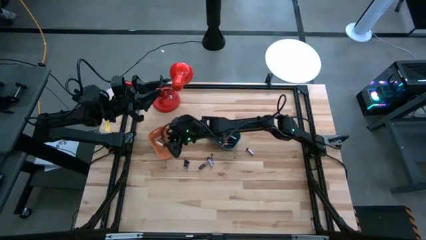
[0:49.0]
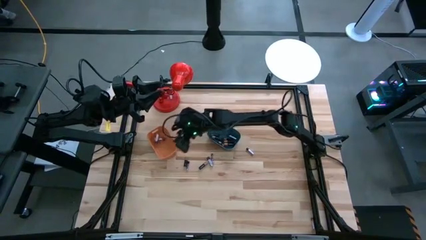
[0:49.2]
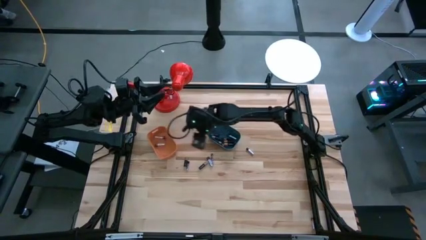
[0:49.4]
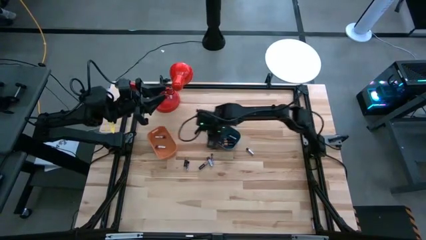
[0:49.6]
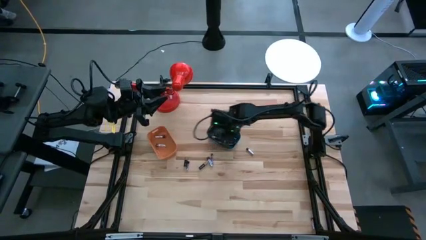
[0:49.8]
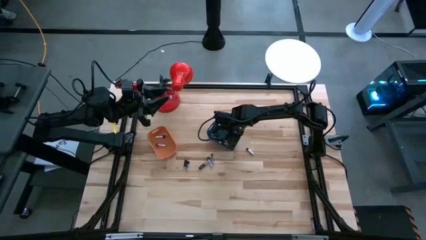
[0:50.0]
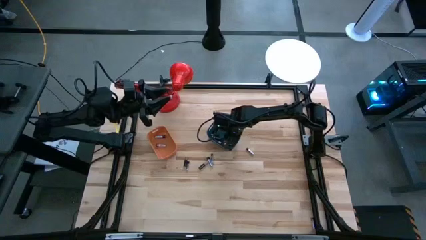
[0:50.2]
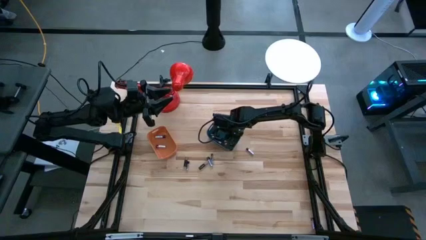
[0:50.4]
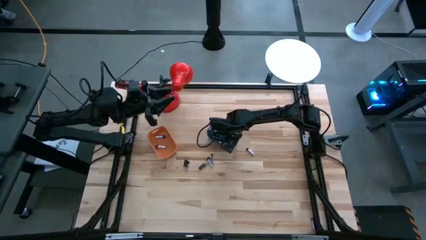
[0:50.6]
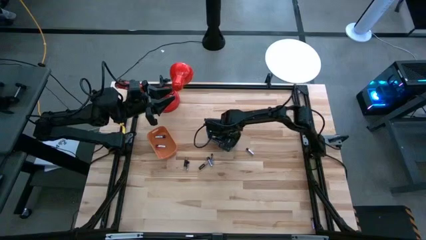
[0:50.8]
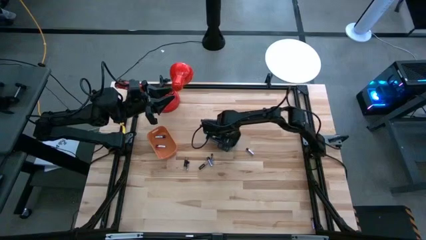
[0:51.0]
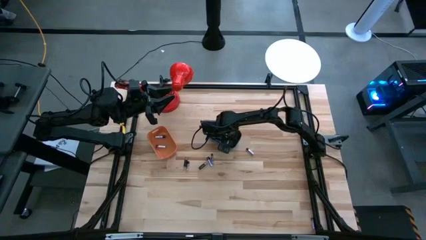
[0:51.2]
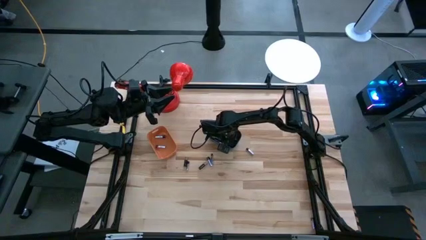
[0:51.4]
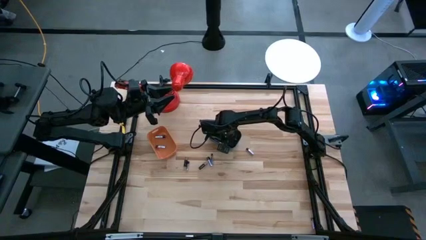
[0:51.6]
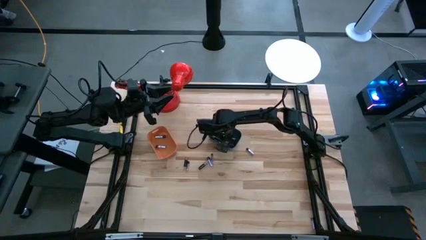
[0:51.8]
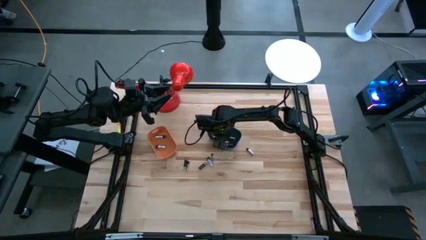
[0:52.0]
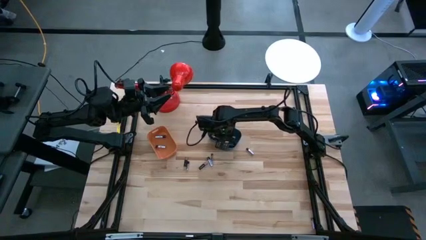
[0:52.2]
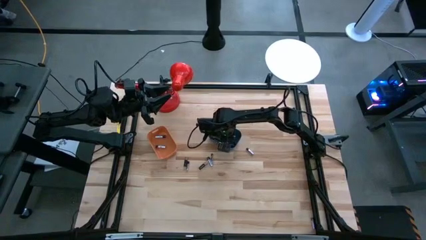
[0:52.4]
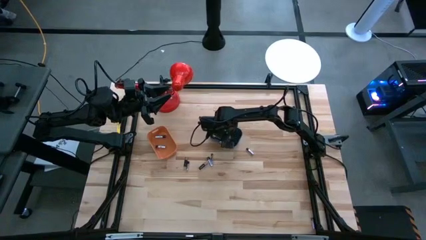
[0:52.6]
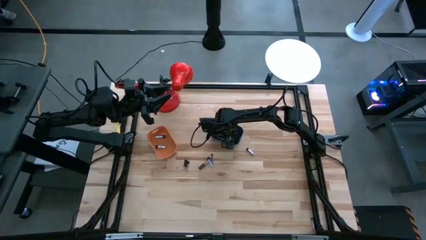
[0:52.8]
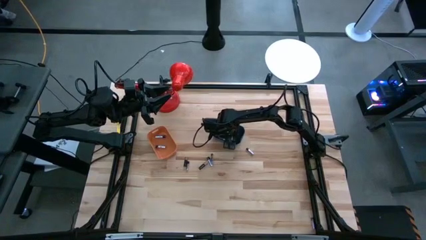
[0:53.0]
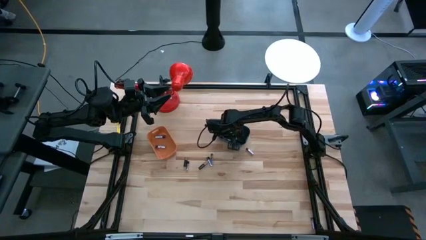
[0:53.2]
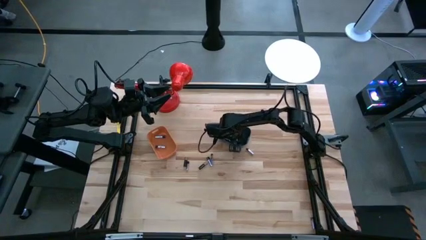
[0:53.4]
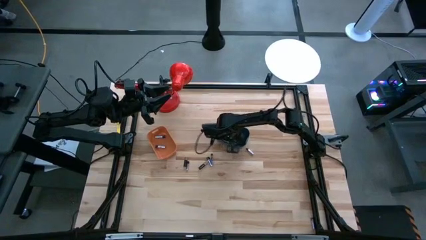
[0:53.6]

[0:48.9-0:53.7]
Task: Sort batteries
Put the silver battery from the blue bin into the orange bin

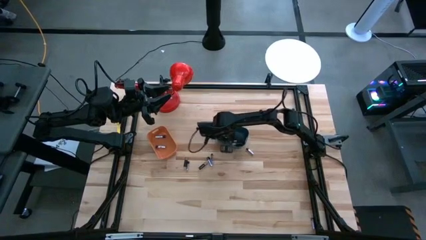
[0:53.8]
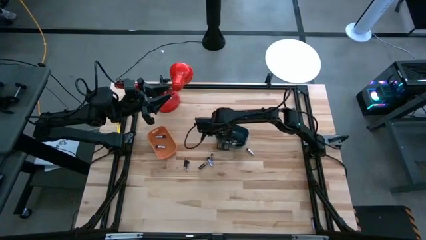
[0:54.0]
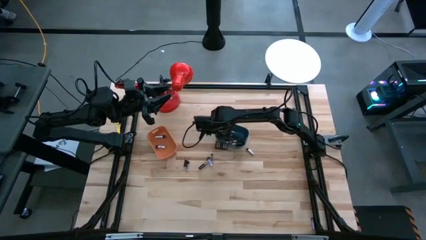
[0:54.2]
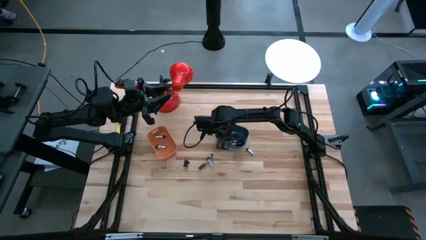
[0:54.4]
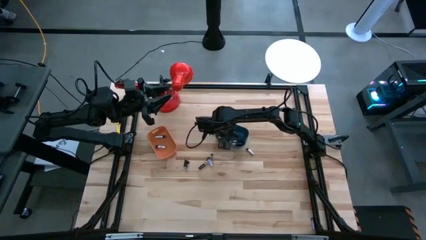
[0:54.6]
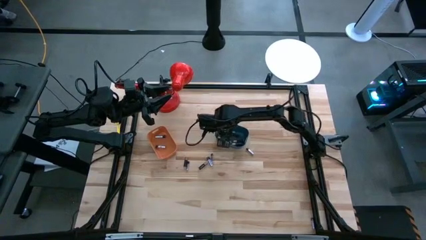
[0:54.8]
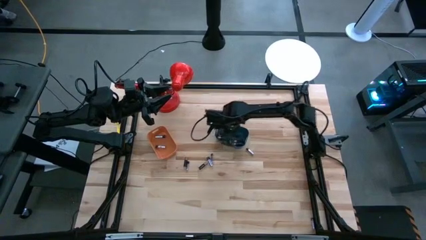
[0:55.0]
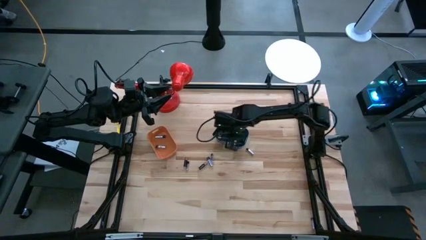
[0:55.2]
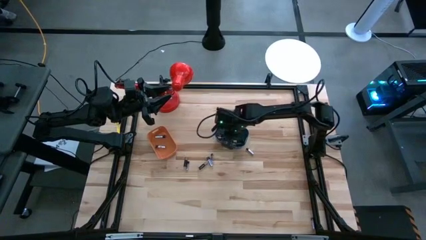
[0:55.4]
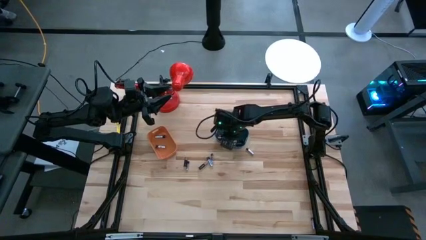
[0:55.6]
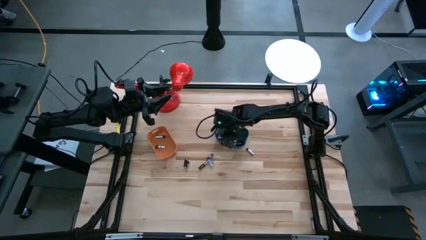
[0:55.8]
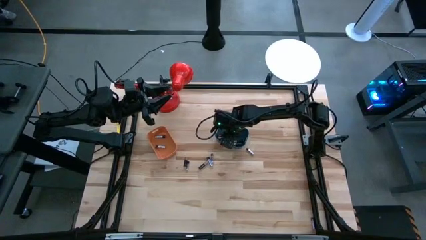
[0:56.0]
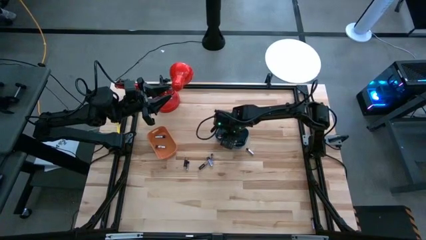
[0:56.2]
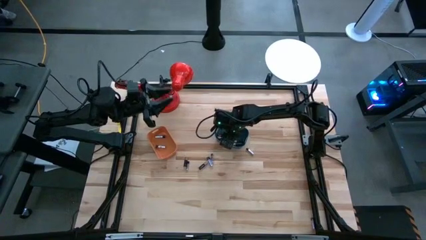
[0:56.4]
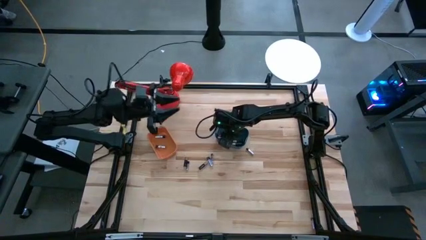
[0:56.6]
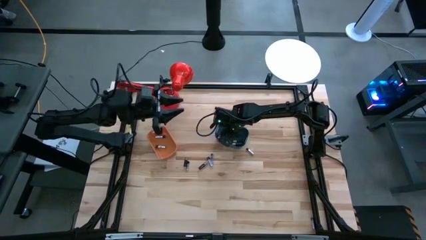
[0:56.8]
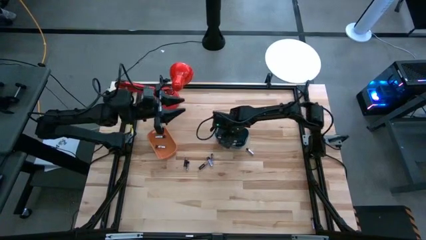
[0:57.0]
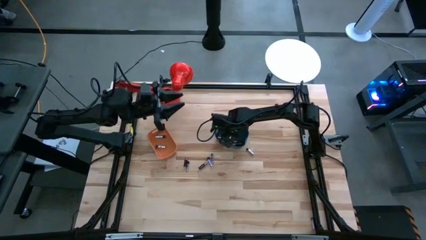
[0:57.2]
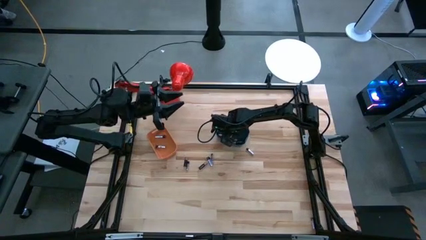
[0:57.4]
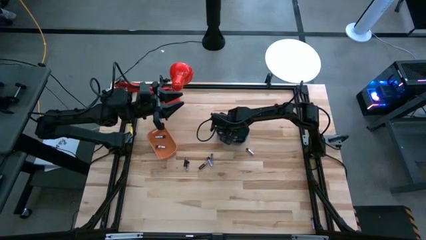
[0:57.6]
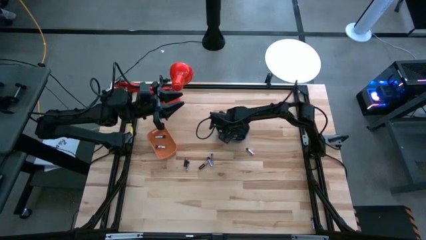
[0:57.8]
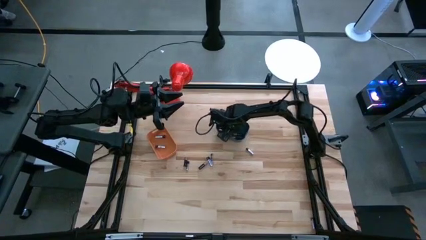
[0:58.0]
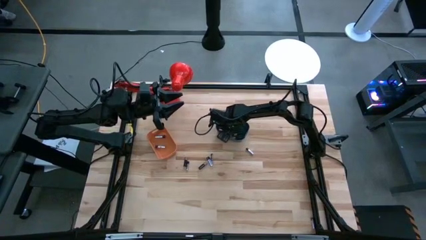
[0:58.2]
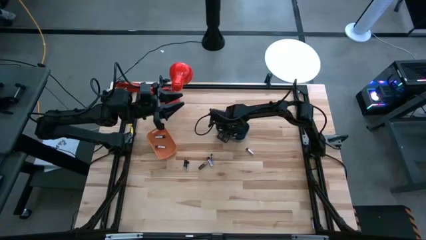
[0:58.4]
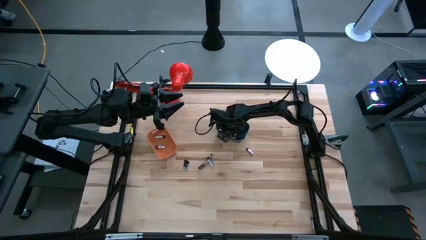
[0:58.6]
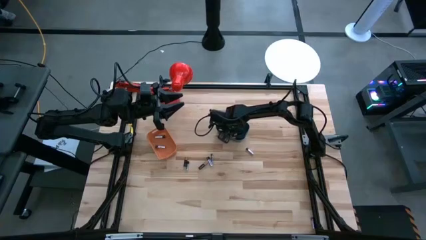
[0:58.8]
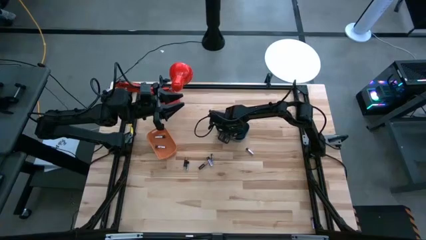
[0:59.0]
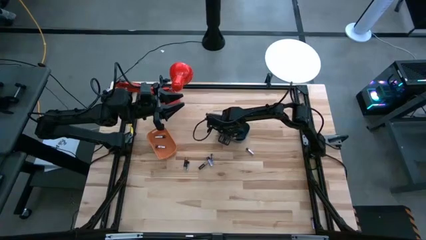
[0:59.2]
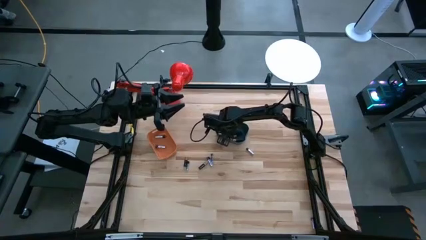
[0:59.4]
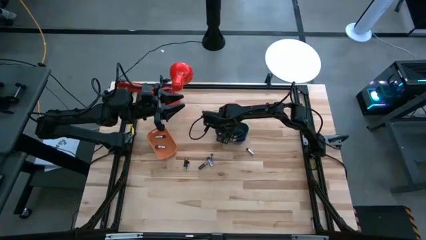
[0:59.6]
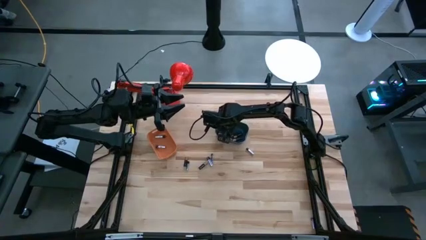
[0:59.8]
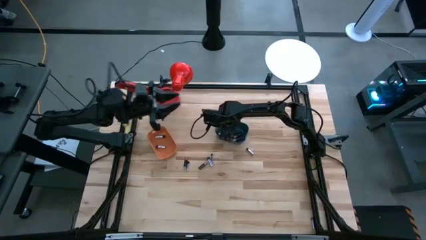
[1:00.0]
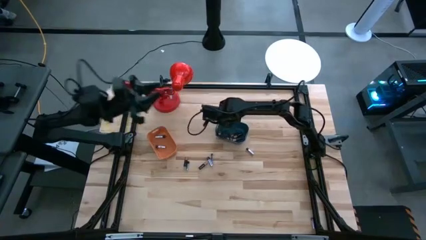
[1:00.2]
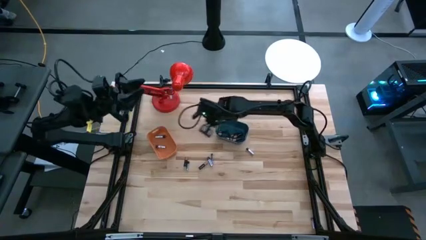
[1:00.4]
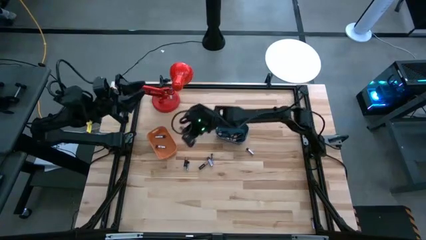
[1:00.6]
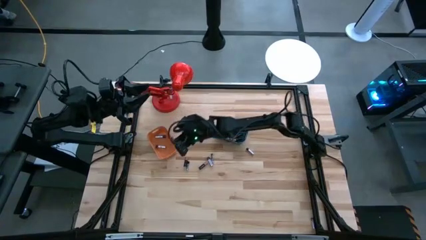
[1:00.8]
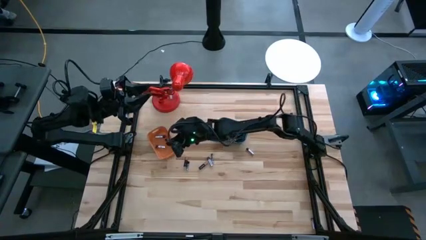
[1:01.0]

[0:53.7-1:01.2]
Put the silver battery from the blue bin into the orange bin

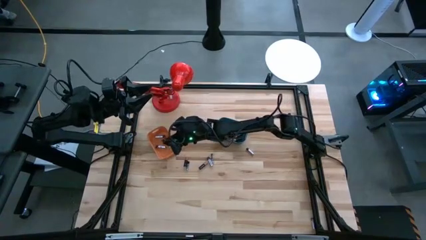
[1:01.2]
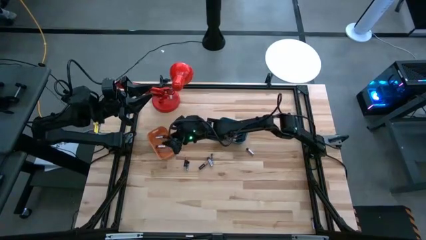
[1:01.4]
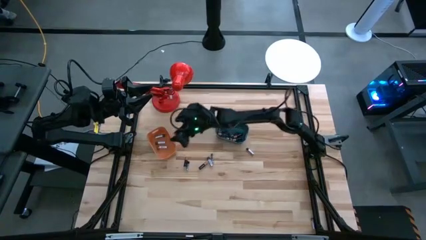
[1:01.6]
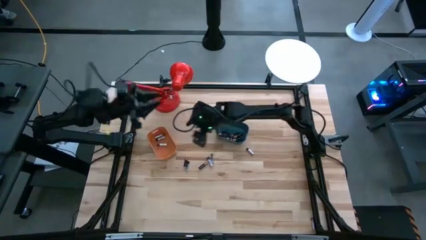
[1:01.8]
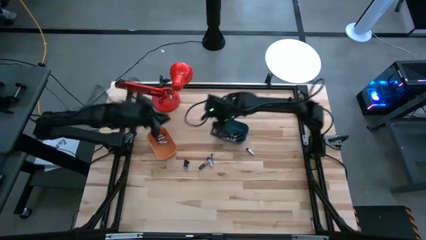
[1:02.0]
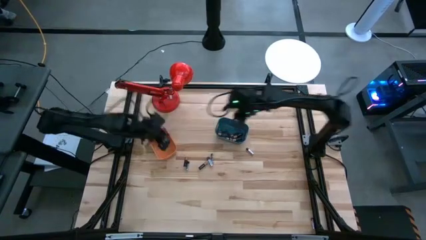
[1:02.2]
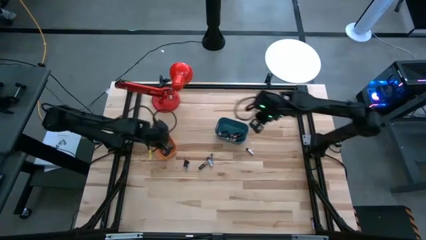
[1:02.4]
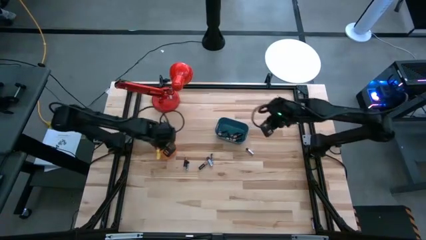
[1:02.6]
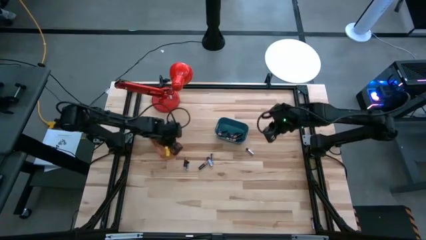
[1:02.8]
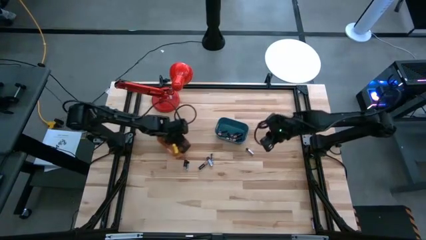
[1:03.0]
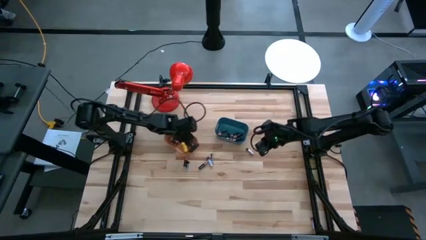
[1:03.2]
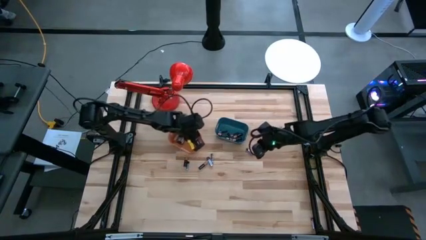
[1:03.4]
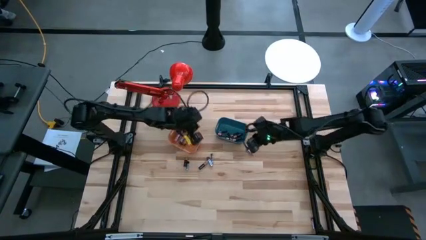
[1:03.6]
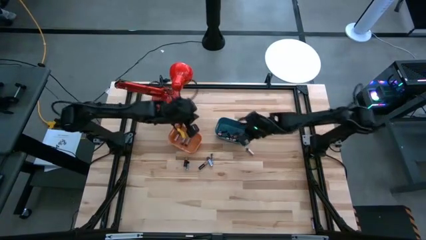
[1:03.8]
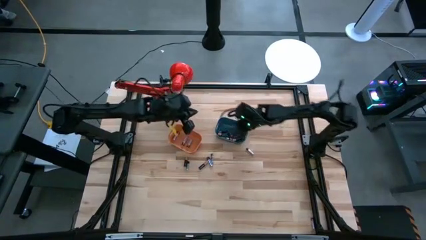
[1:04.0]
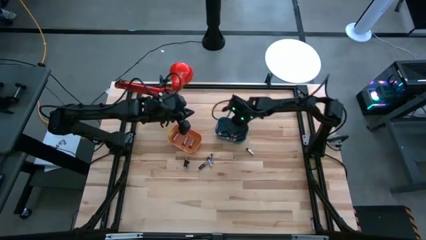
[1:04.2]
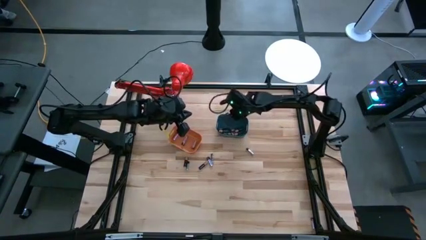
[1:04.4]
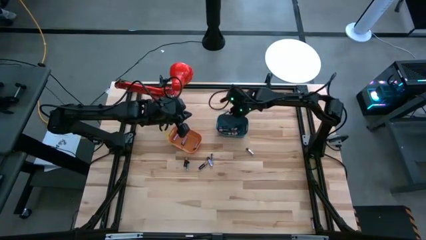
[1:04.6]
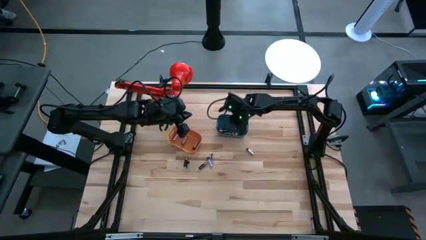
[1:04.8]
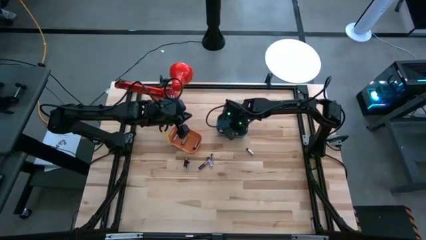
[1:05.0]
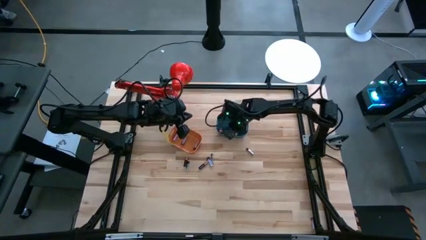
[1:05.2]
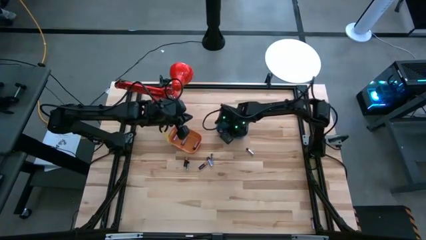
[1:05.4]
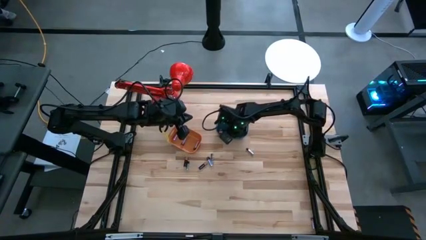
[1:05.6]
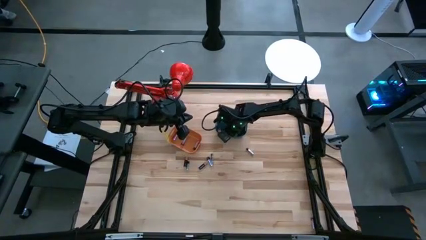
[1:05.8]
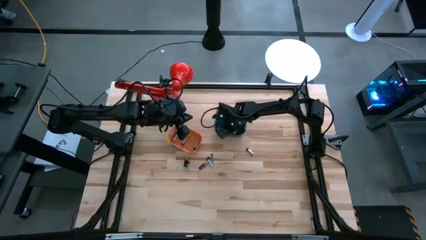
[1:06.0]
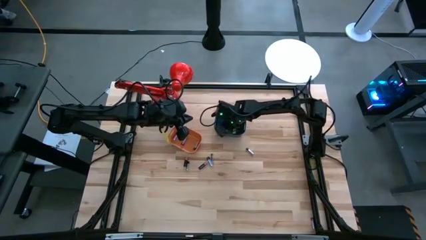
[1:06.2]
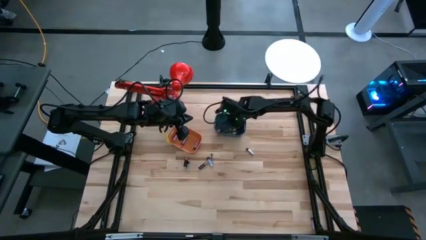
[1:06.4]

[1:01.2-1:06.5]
Adjust the orange and blue bins
